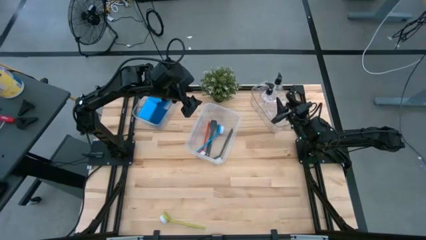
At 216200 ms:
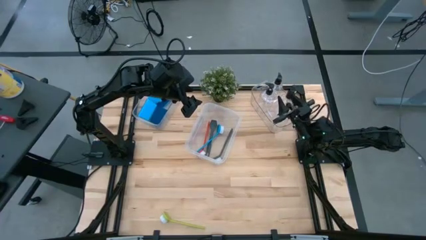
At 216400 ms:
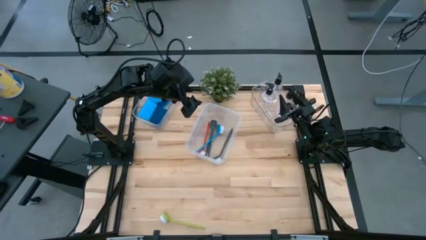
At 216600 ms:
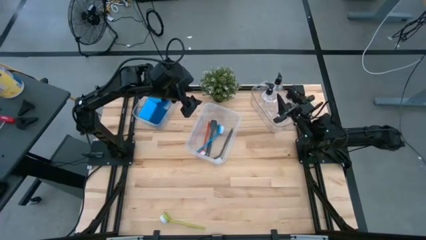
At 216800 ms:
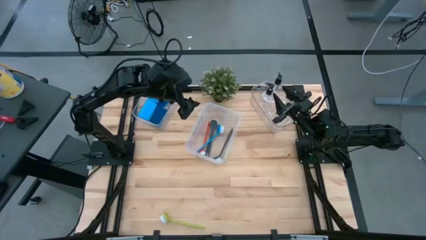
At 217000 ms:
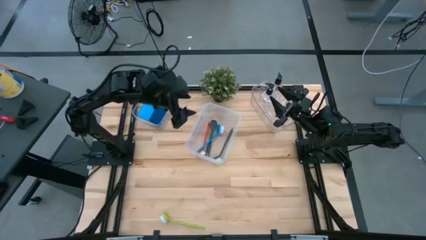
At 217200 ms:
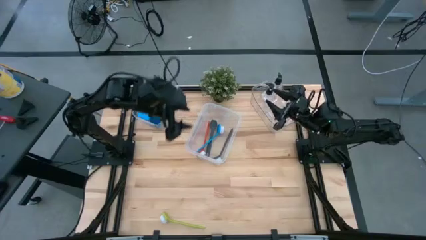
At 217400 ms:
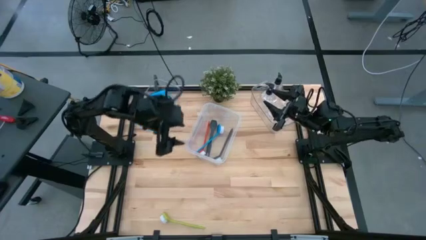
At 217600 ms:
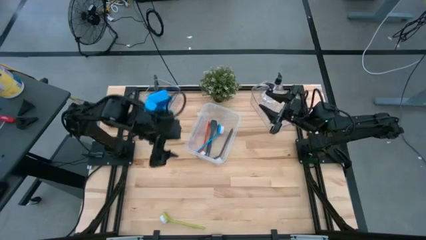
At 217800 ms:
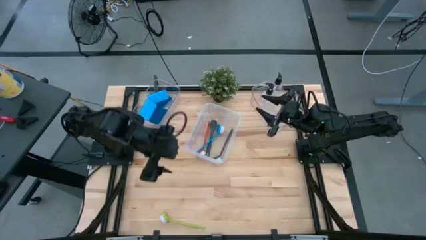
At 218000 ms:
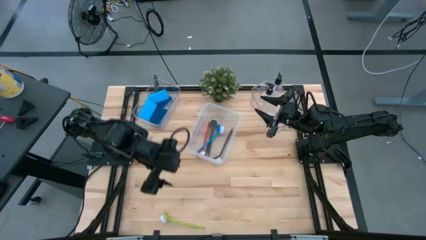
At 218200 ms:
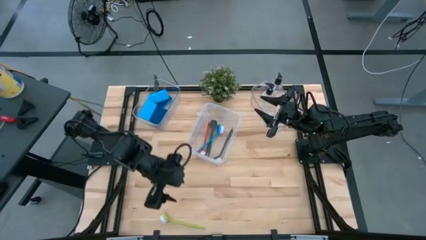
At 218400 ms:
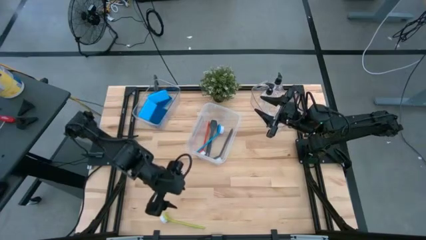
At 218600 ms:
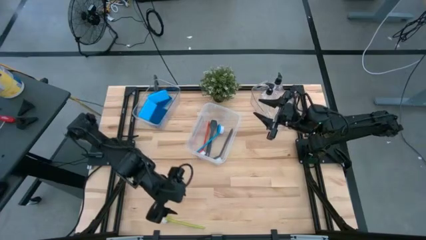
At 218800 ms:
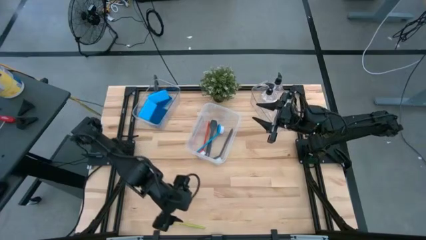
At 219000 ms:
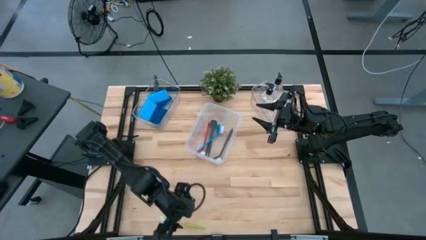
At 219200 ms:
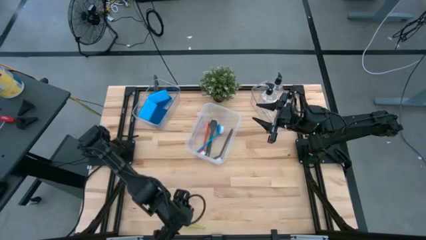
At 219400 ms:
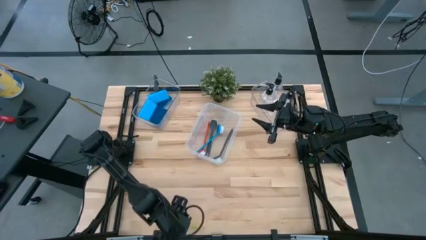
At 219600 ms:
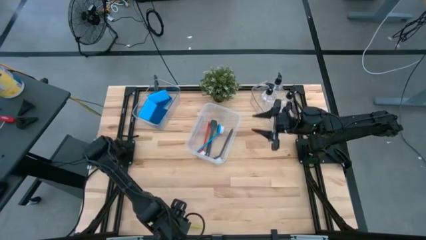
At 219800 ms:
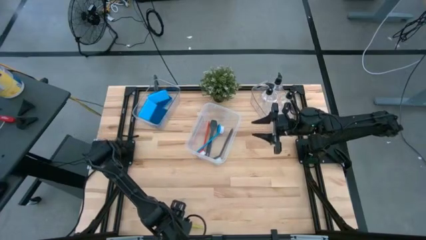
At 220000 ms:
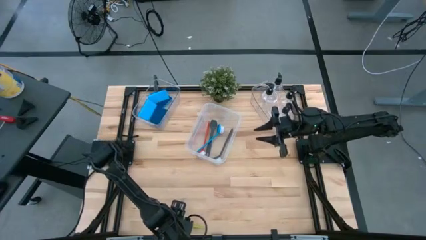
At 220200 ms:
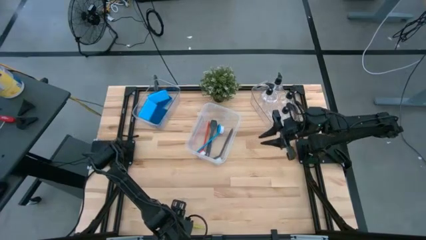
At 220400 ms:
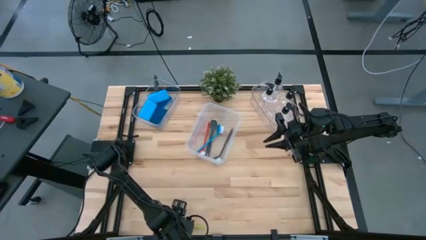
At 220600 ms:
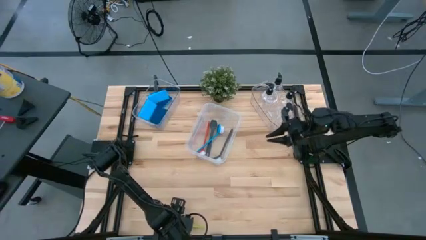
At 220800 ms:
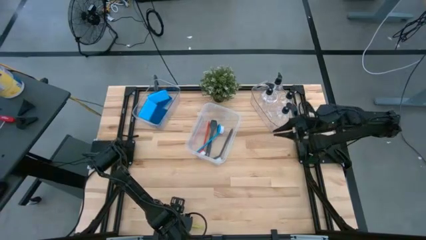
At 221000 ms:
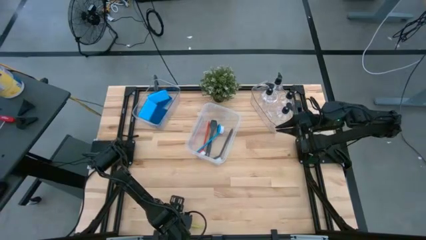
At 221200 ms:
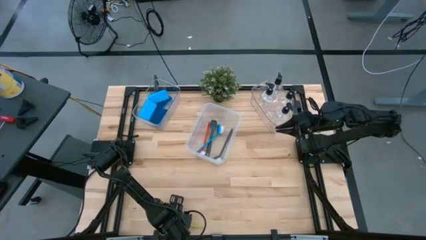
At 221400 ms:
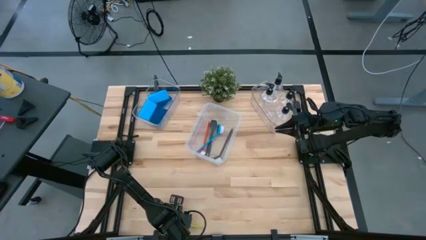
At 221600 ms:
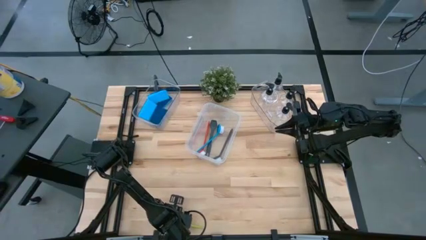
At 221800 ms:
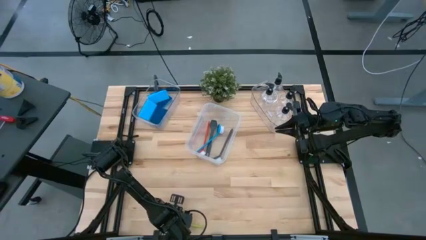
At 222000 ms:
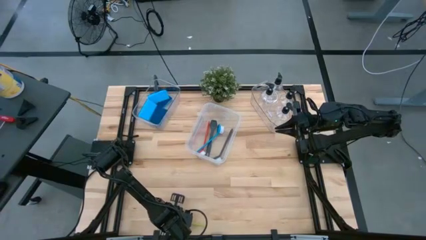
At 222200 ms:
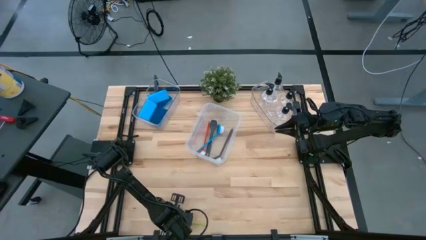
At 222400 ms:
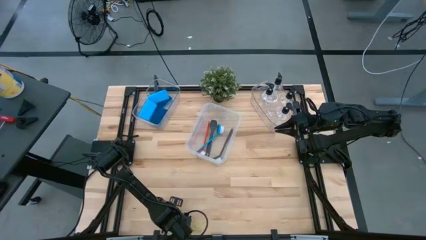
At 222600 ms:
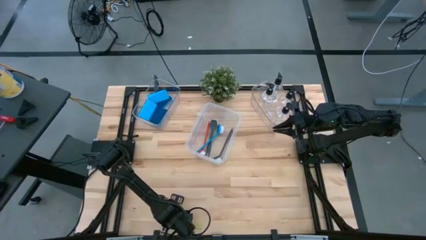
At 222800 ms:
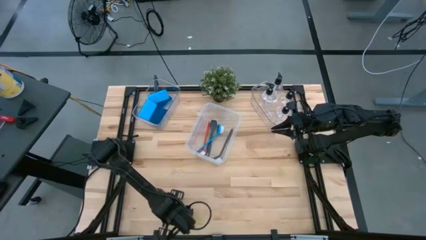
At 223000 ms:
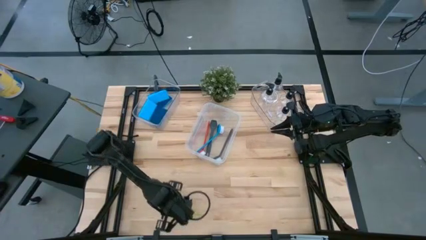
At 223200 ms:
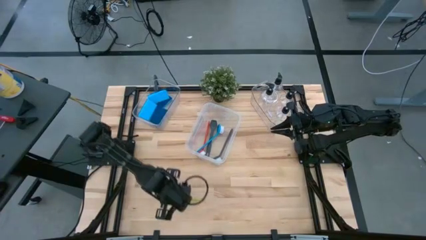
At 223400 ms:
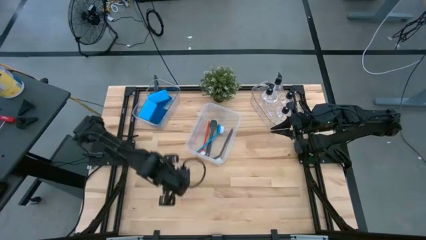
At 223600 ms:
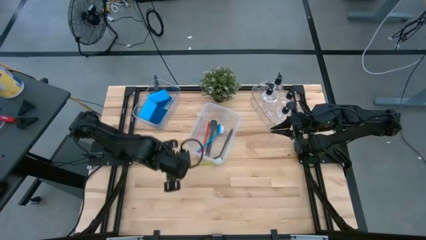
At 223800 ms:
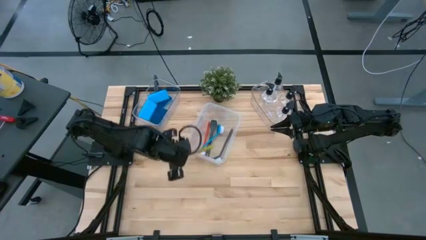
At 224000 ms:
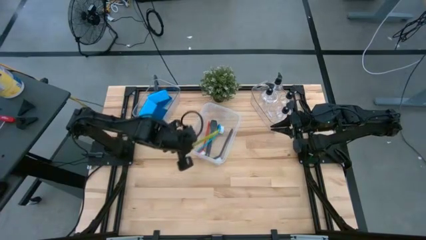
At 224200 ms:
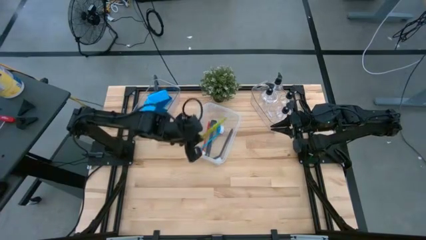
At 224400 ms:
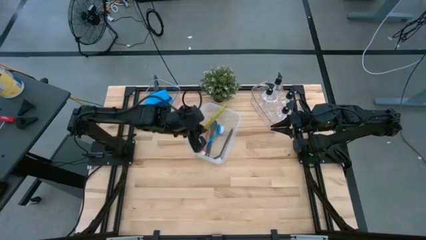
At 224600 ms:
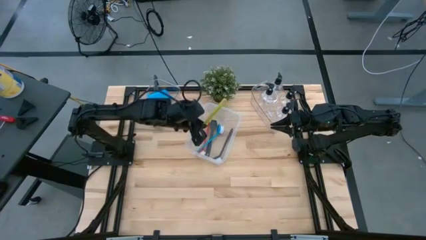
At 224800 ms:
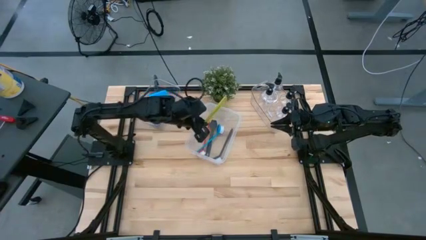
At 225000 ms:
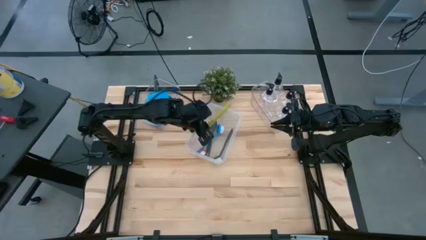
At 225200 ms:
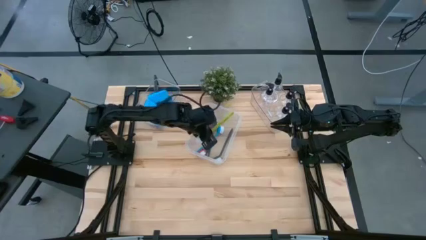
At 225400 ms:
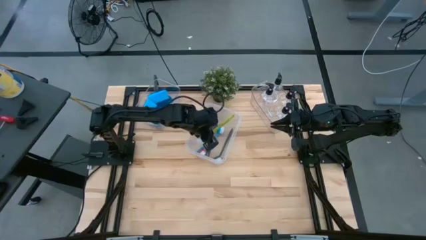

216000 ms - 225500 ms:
Task: Pick & Place Kitchen Sink Supplies
Put the yellow dish brush into the middle transparent bin

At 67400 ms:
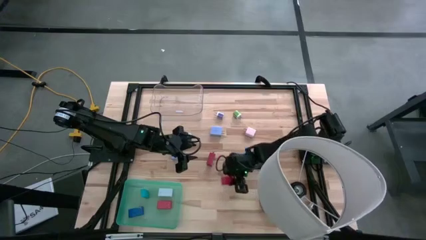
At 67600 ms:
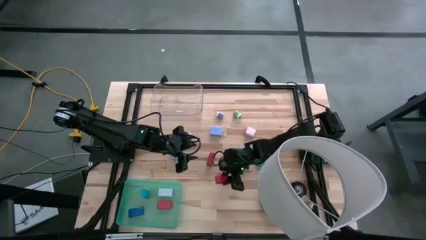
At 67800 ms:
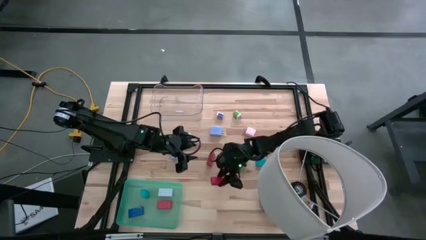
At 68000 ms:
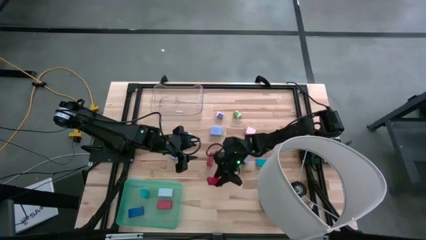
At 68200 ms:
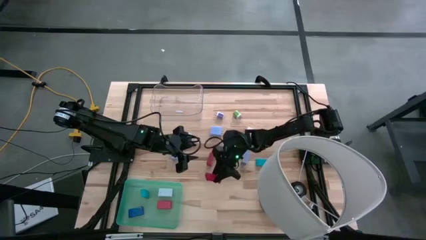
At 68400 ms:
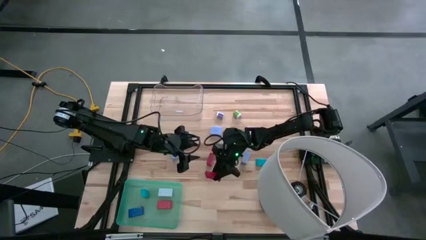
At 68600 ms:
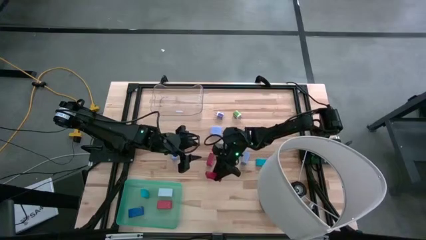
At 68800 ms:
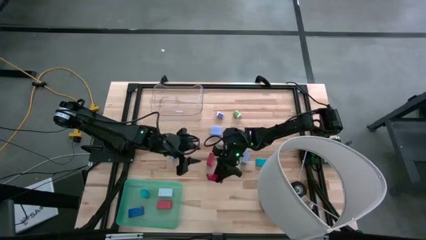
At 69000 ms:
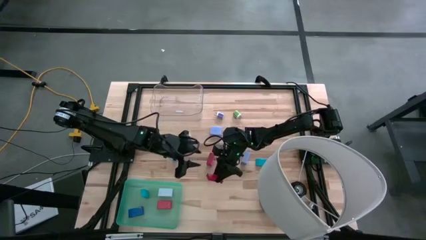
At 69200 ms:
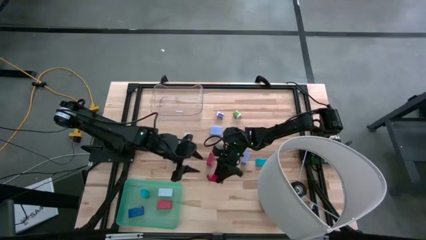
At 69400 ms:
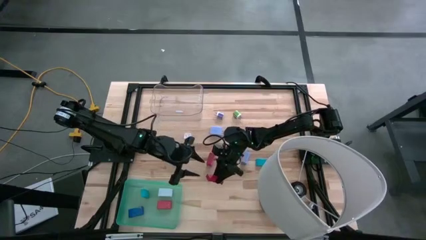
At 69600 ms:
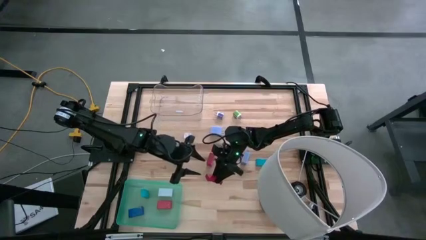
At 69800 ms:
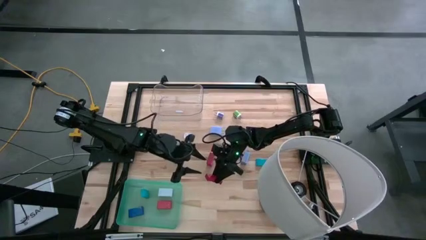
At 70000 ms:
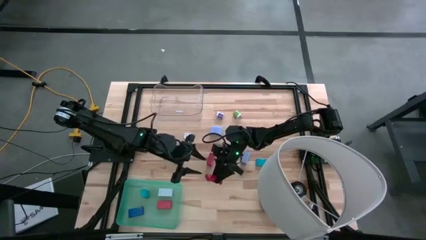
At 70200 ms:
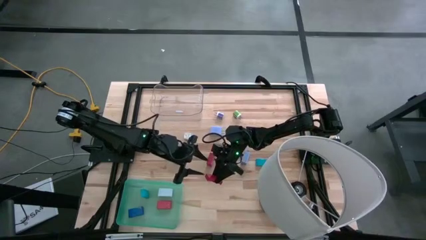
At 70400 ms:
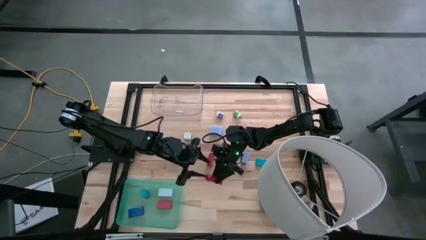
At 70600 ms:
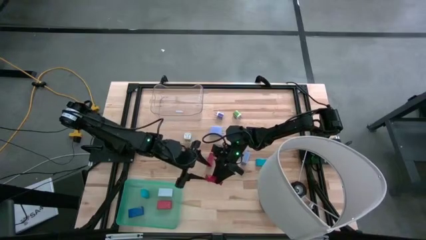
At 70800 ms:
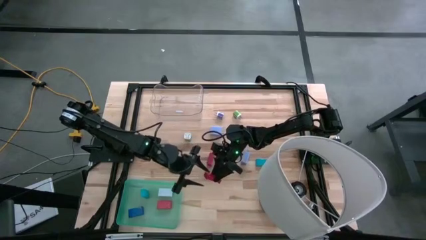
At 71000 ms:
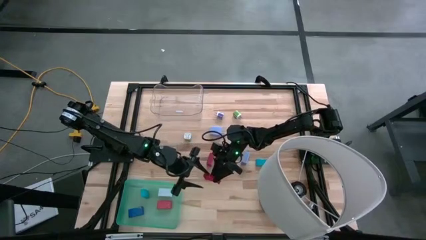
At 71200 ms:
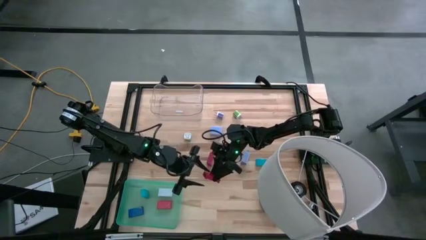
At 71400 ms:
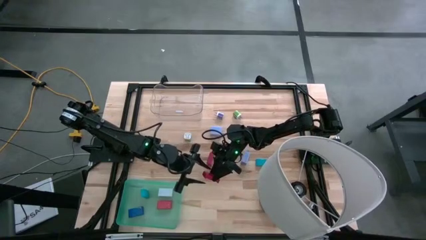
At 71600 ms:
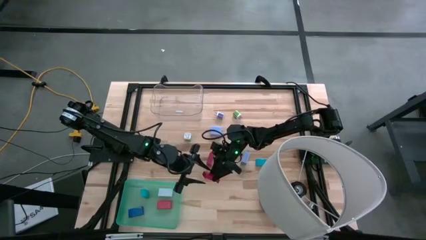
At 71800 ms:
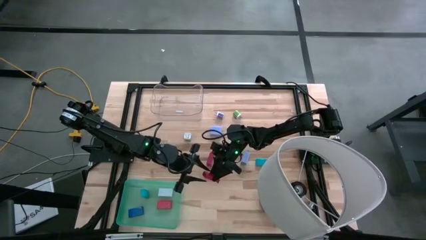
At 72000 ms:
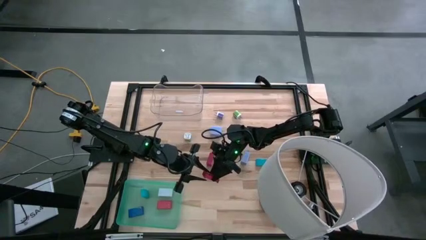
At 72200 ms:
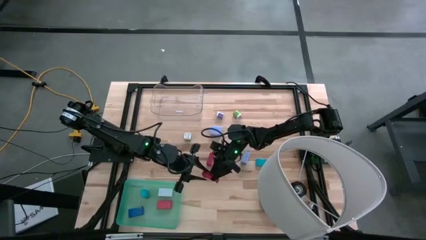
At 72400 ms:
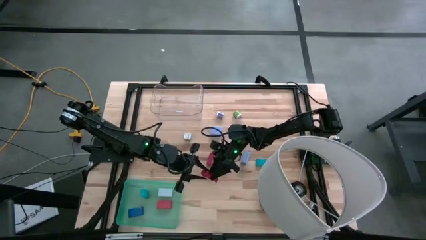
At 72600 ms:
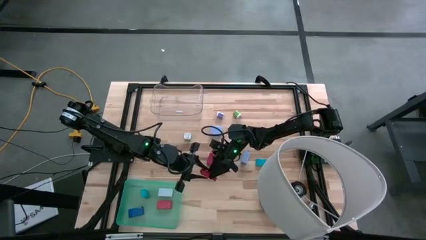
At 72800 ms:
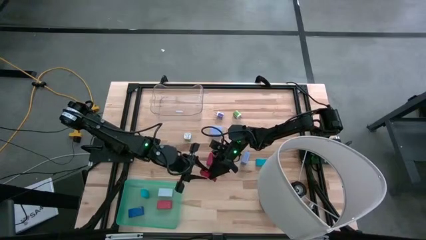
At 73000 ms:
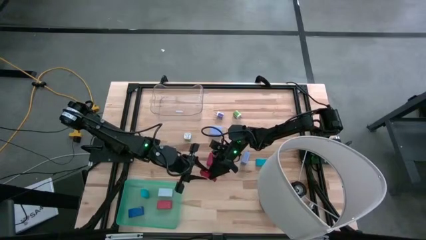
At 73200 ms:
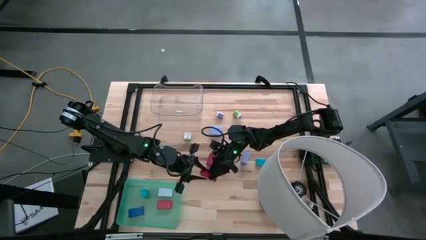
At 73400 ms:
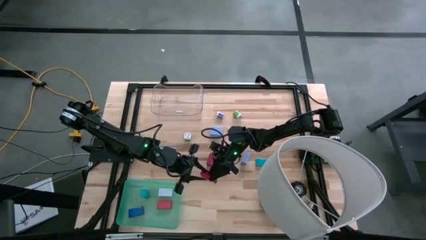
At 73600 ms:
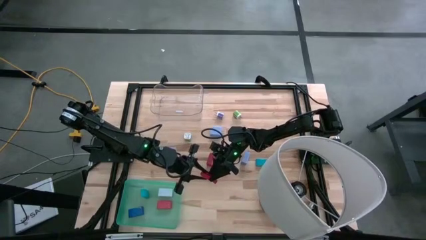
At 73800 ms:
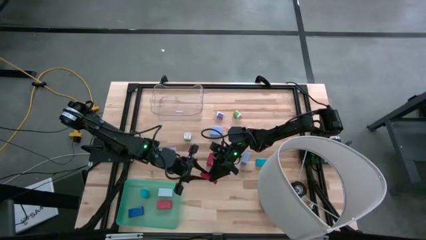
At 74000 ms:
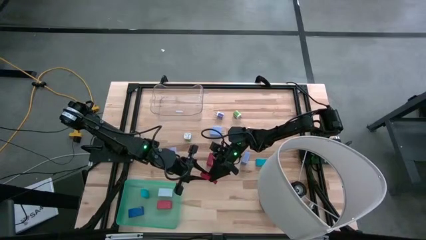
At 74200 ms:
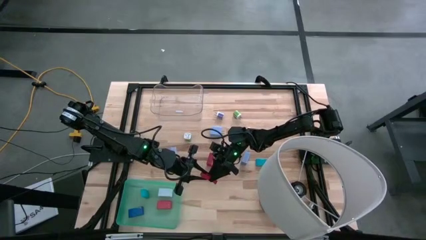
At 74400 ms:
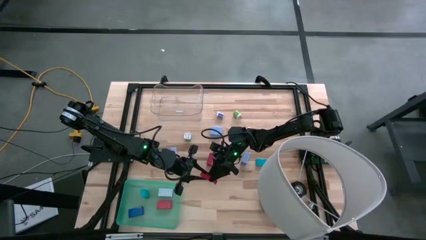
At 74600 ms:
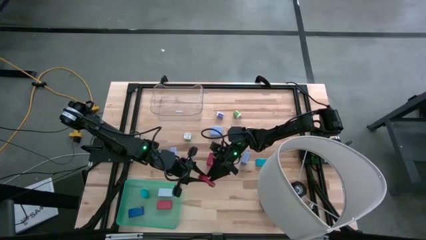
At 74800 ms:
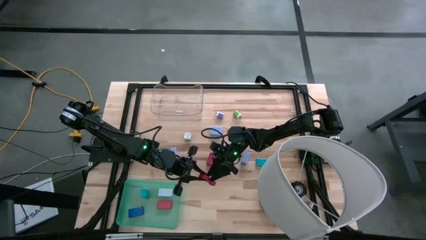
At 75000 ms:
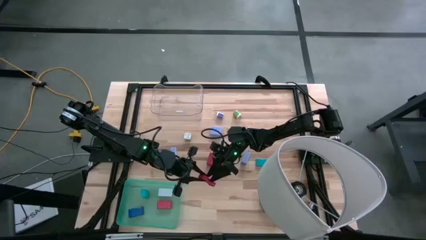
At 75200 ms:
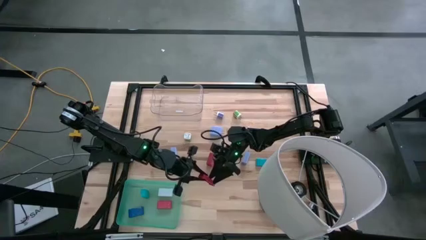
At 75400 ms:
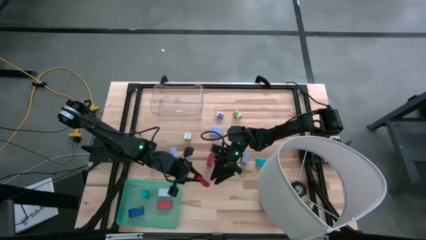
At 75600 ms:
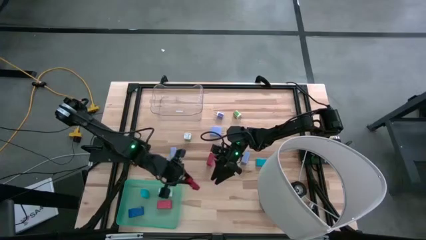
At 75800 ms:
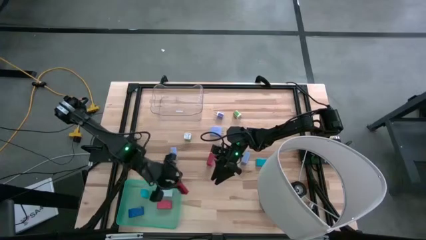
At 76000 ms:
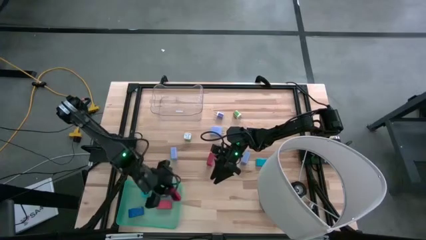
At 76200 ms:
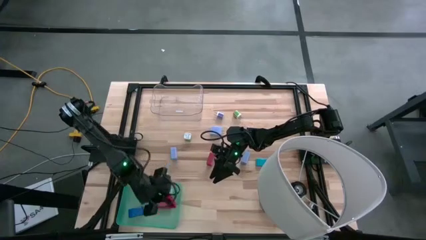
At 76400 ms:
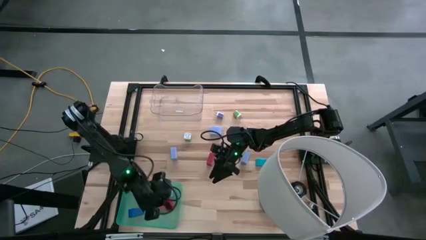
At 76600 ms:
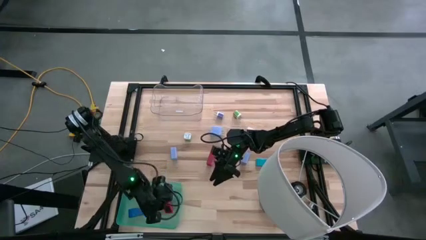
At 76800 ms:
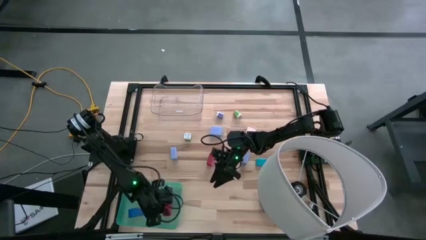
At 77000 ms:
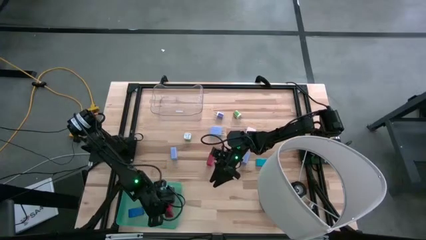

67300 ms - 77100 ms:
Task: Pick & Place Office items
Put the red digital clock into the green bin
